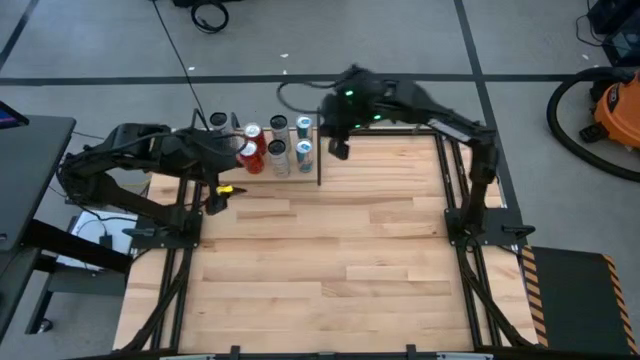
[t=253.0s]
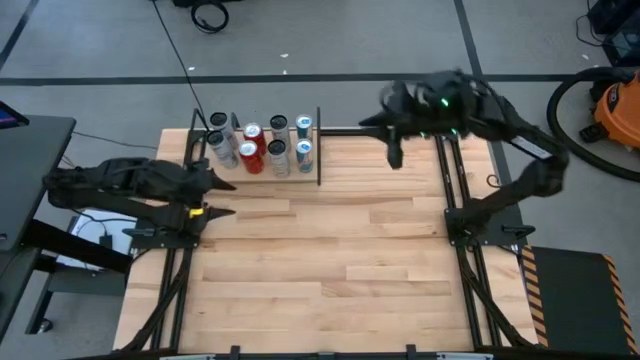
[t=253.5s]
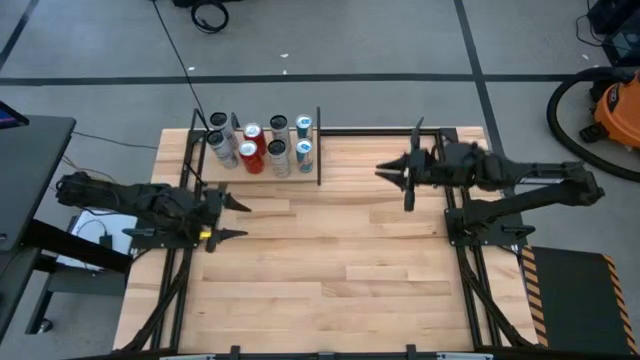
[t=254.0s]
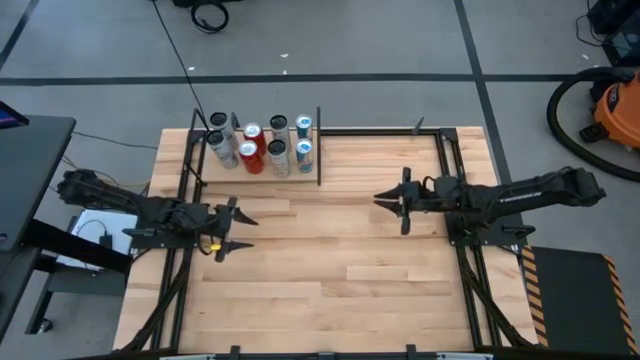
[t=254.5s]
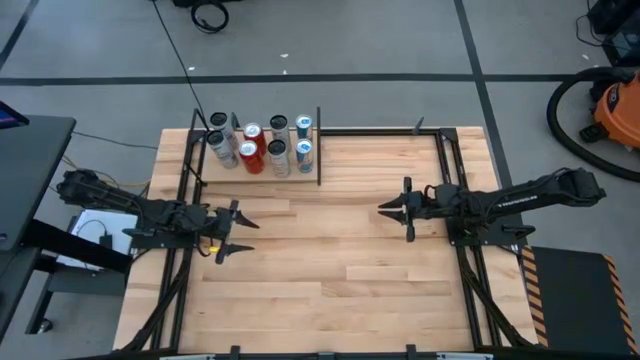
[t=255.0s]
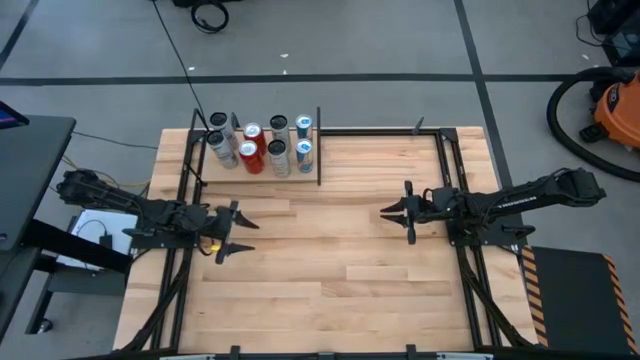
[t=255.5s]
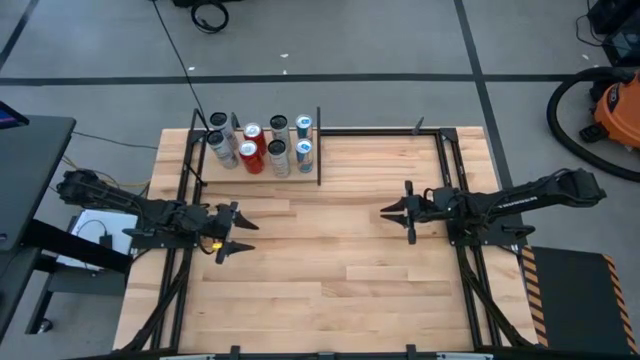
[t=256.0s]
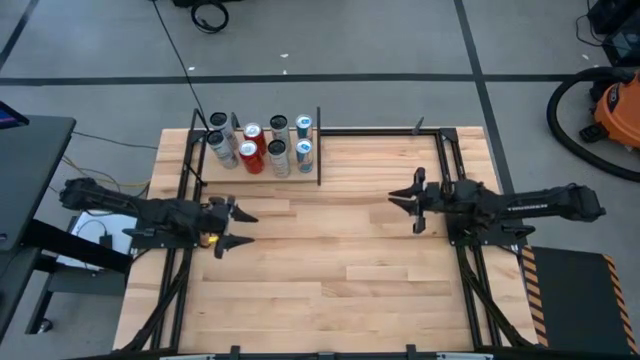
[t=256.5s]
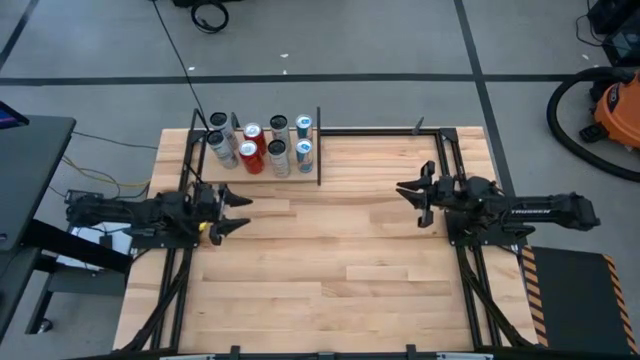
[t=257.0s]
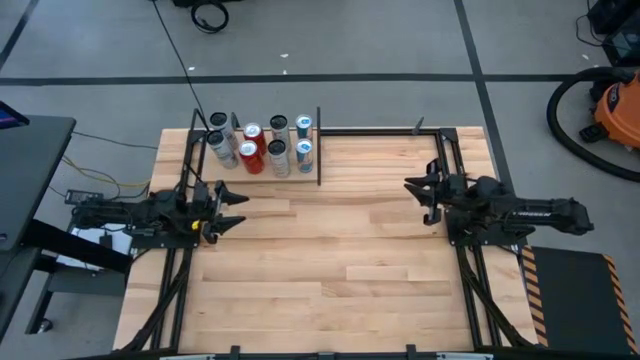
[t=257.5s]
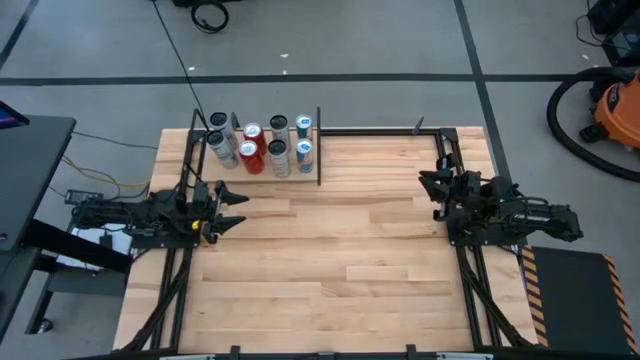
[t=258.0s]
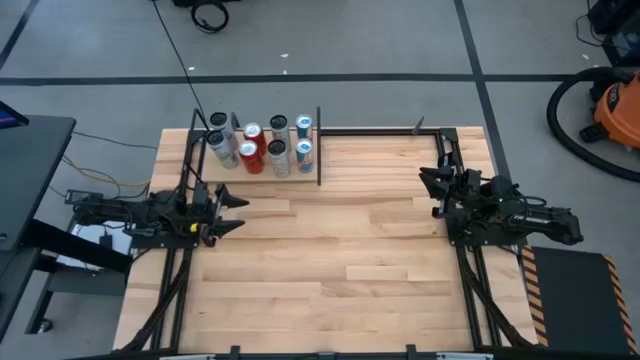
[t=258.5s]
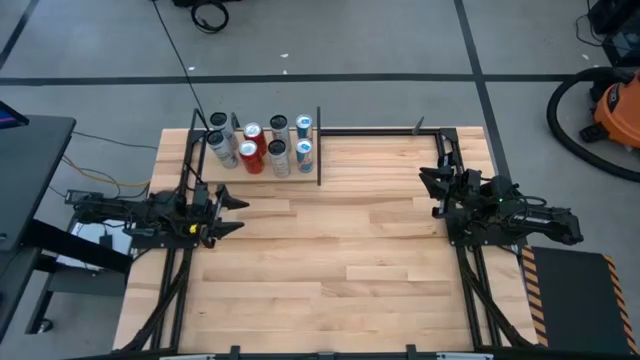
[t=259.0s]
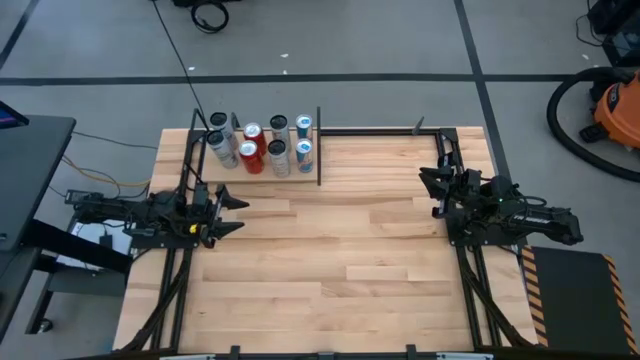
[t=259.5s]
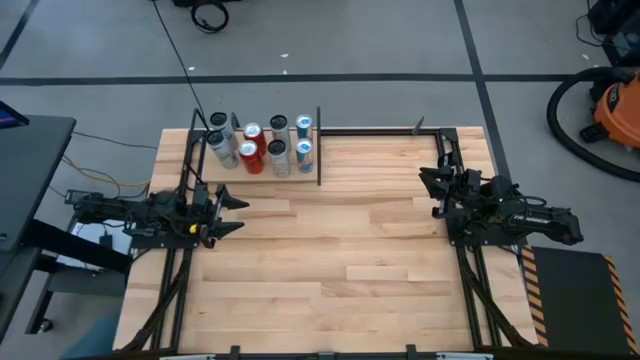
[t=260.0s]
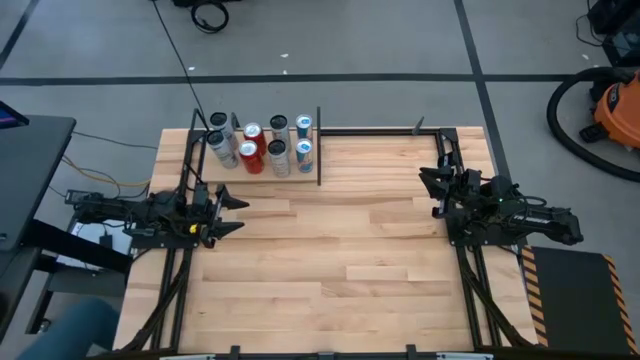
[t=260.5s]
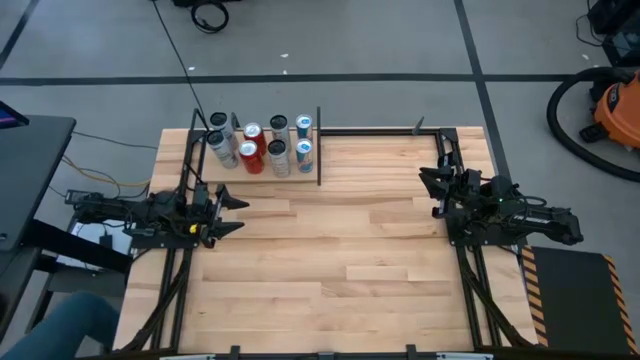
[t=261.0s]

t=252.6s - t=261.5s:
Task: Place canned beverage on shelf
Return to Home Position

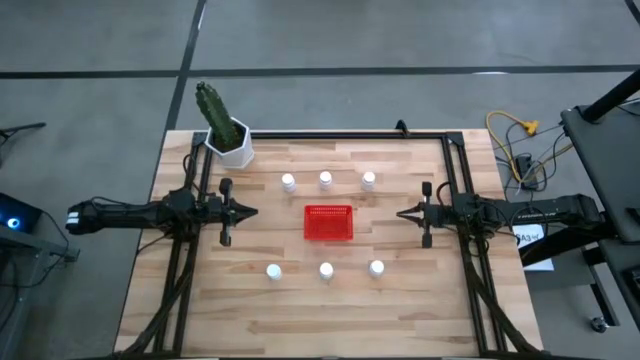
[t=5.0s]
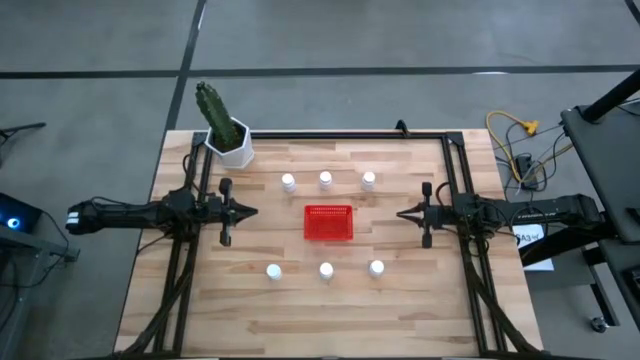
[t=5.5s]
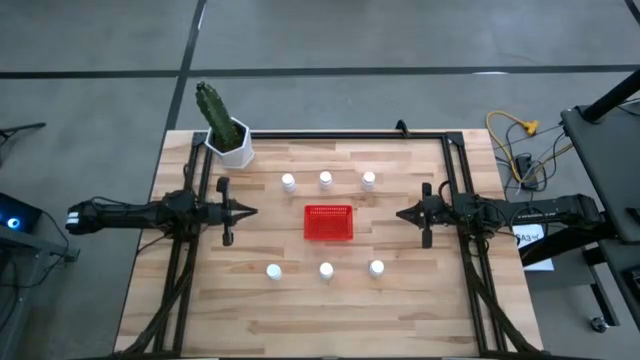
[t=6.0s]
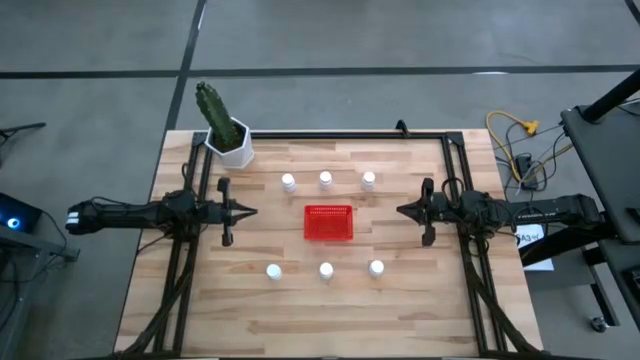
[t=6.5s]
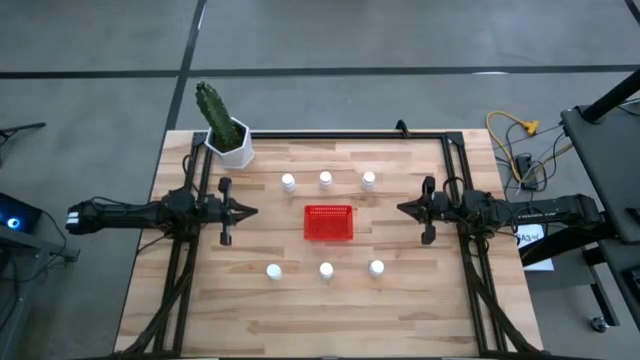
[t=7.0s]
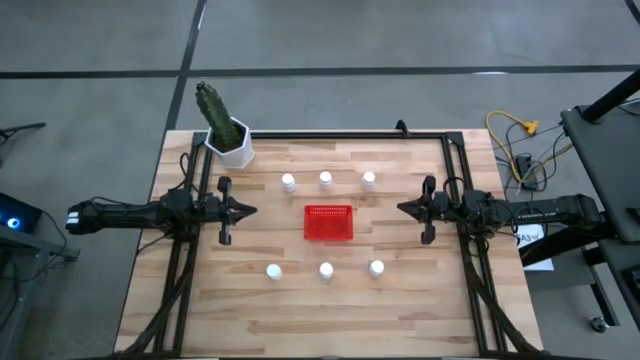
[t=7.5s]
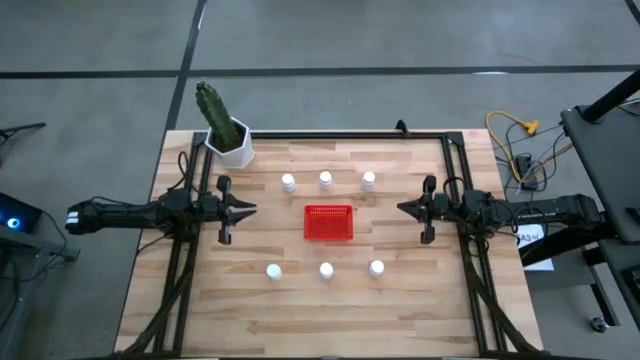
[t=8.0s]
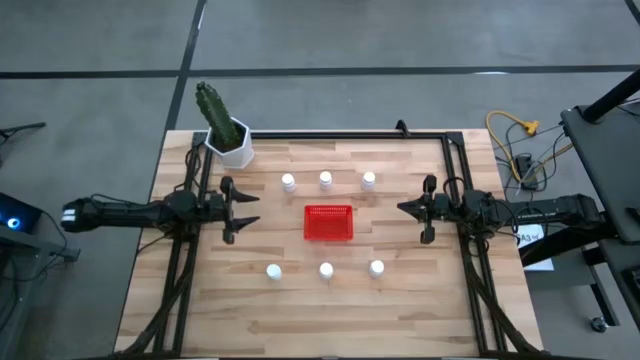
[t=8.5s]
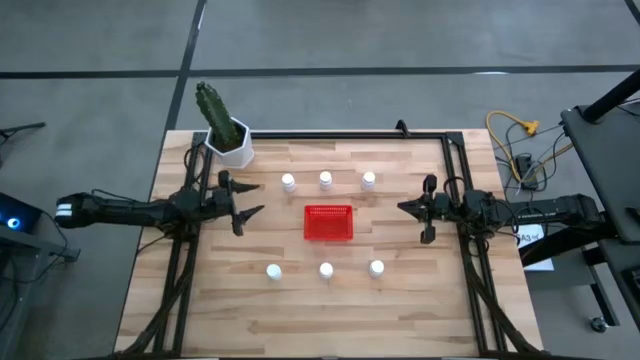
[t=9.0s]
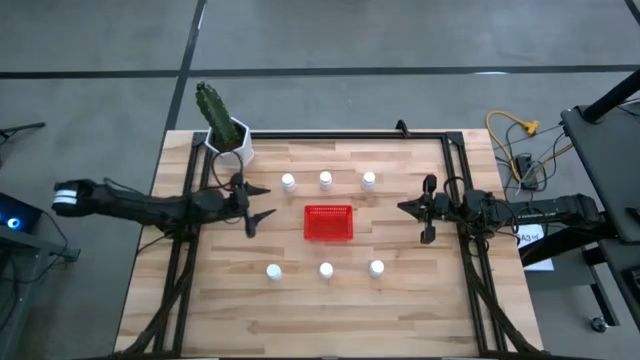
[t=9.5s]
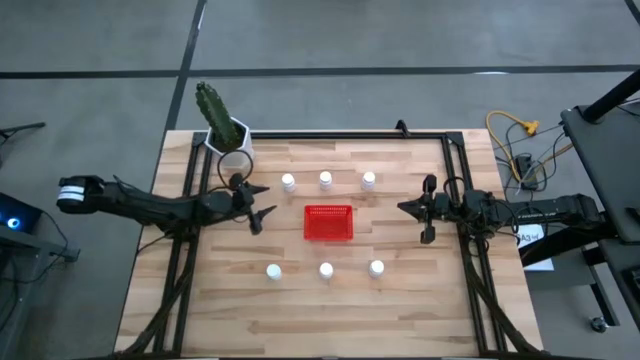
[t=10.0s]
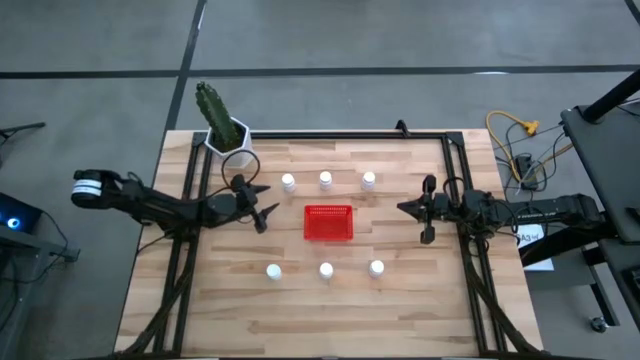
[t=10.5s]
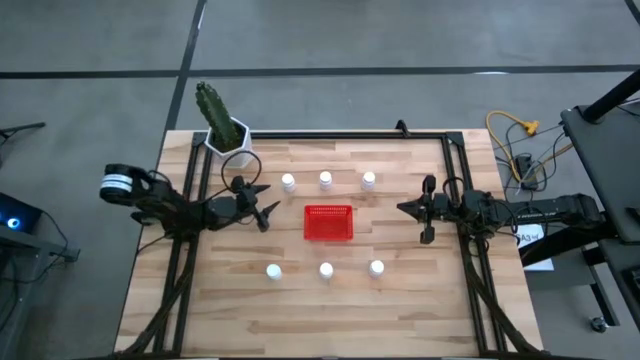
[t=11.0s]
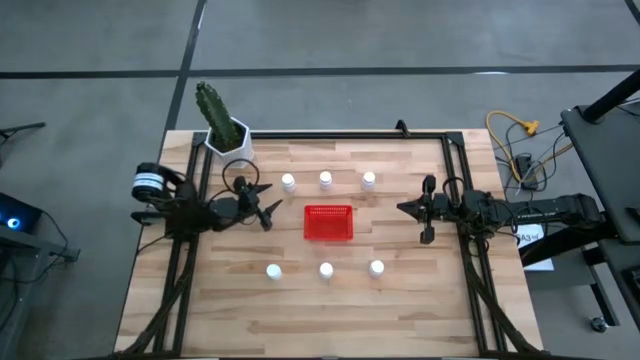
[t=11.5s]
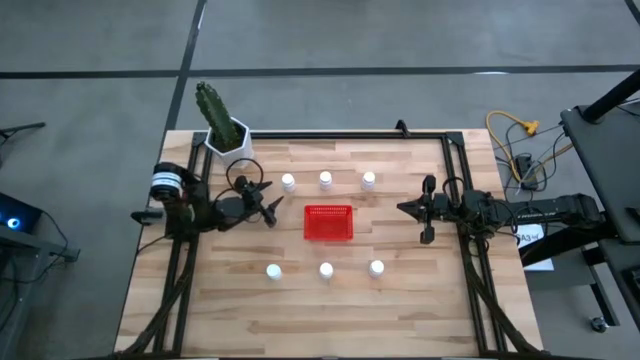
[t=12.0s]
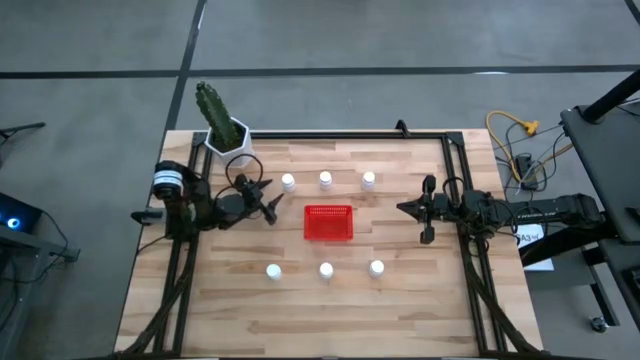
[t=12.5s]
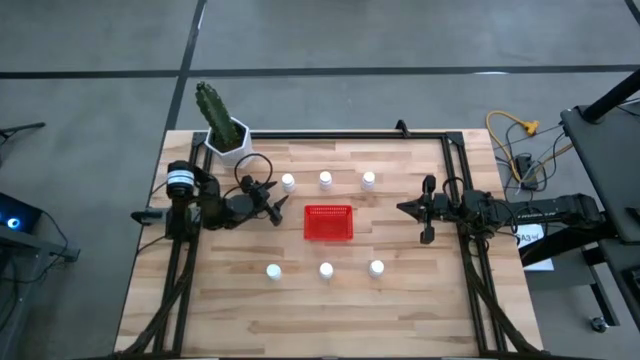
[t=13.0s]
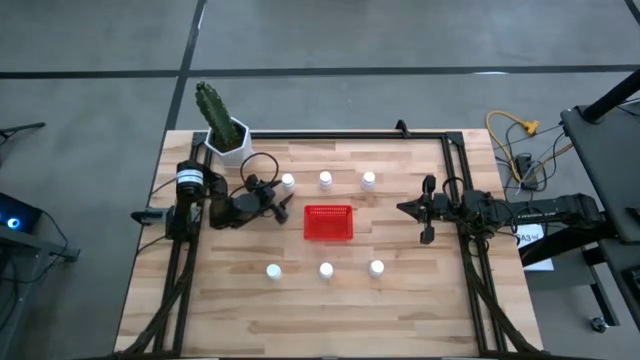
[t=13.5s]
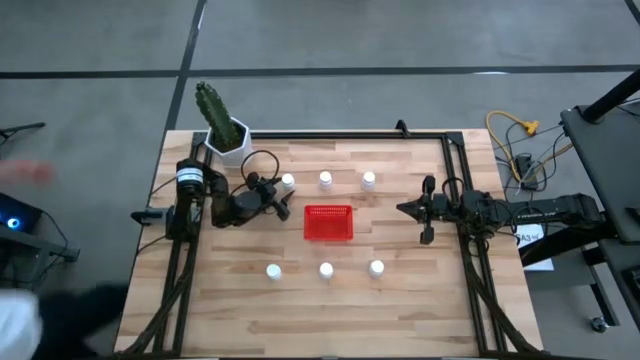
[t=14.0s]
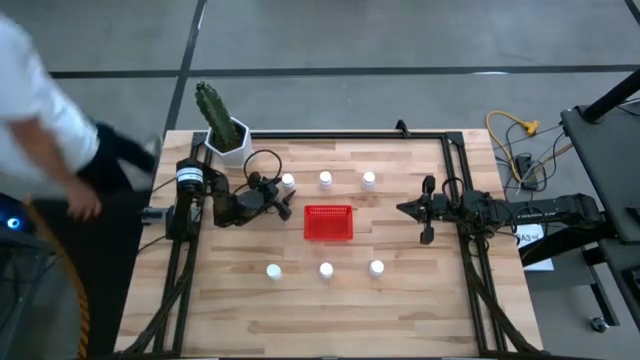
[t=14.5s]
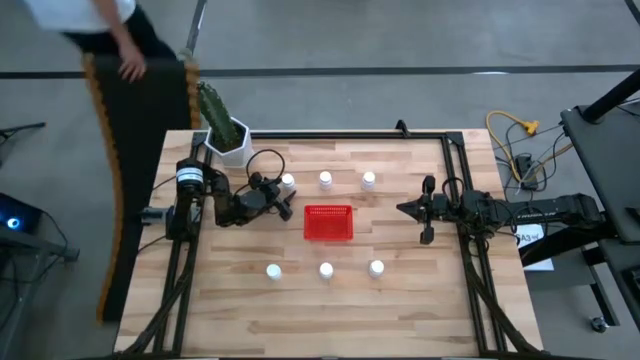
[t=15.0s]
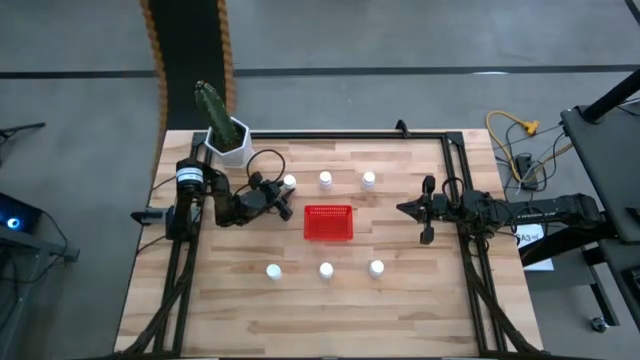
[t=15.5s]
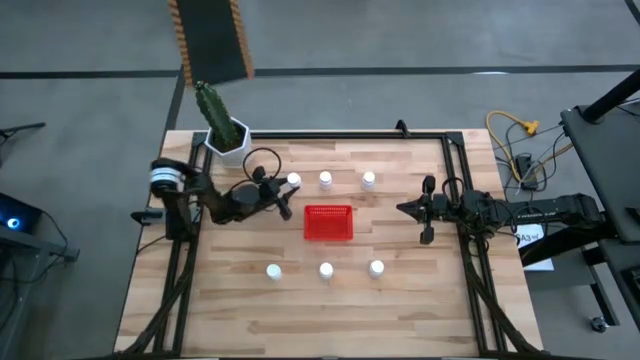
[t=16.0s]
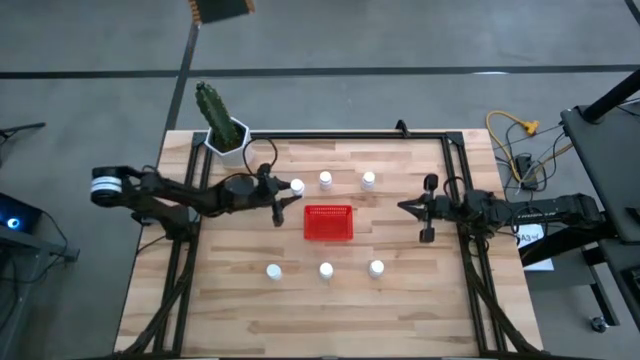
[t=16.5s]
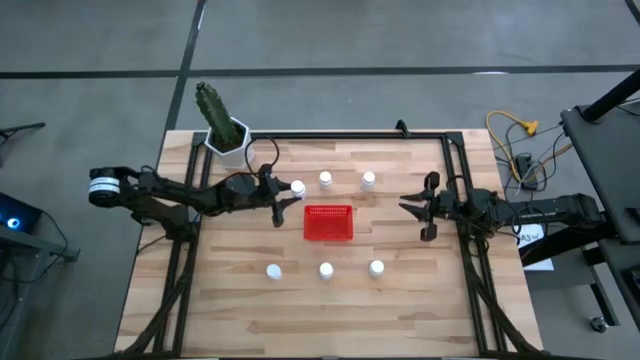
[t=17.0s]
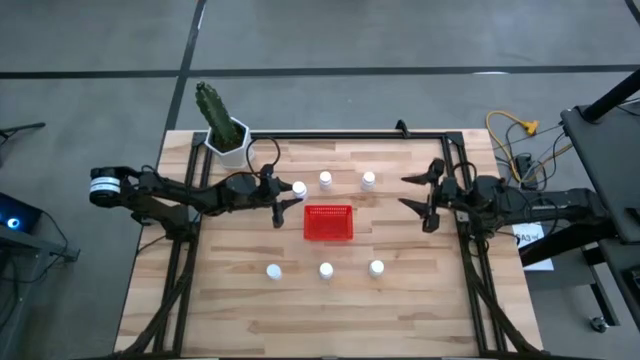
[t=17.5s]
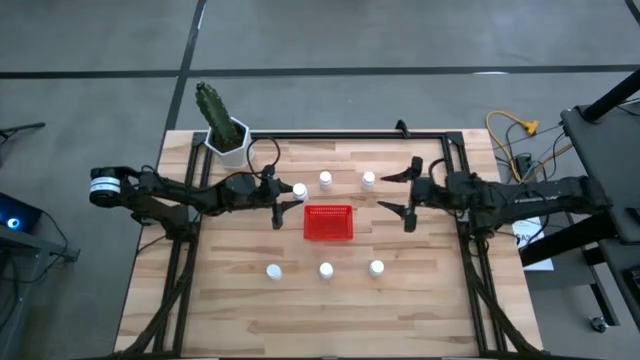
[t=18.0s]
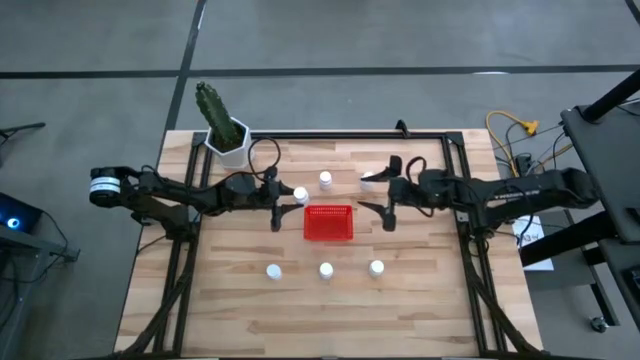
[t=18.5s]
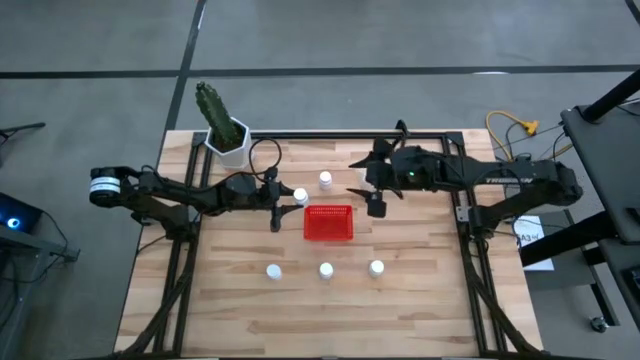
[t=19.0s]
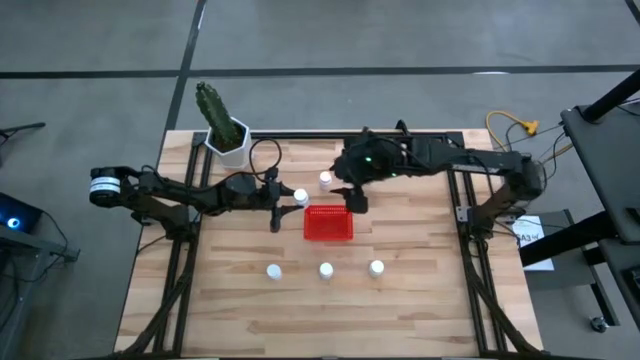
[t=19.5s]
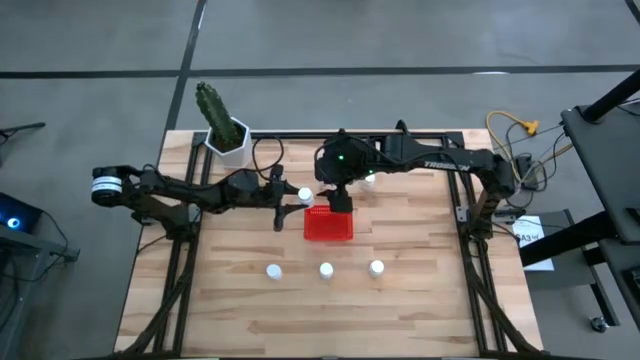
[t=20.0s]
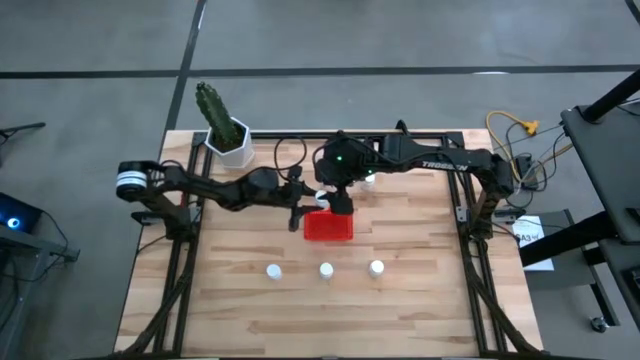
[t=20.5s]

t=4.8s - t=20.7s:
Task: Pick and place pill bottles into a basket
Put the white pill bottle into the red bin
